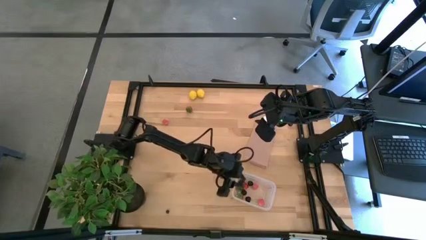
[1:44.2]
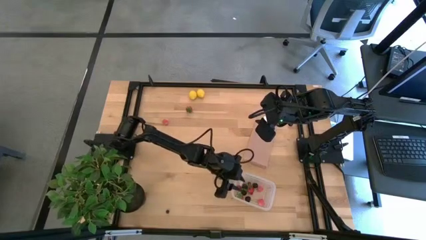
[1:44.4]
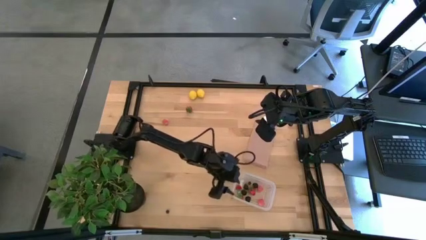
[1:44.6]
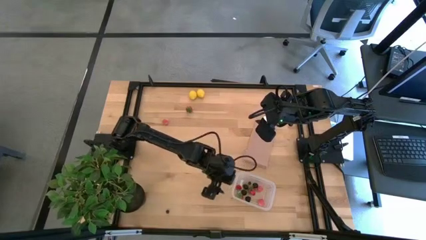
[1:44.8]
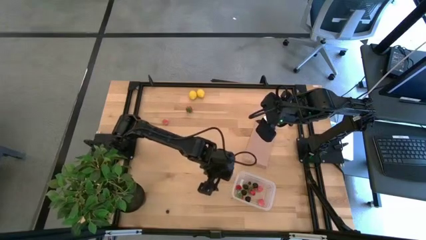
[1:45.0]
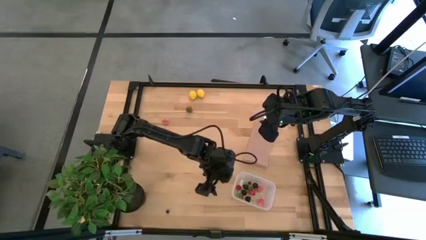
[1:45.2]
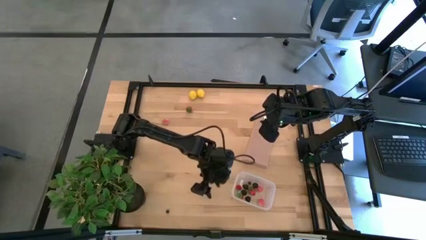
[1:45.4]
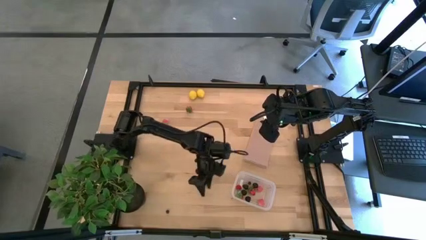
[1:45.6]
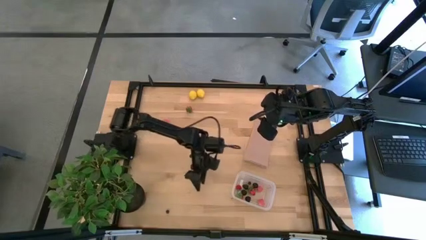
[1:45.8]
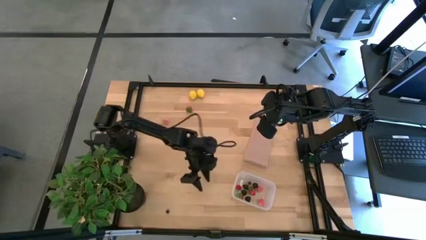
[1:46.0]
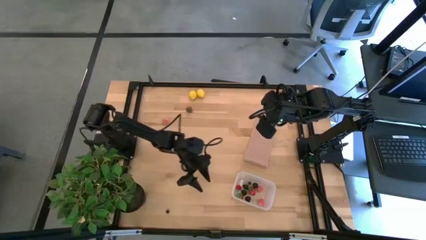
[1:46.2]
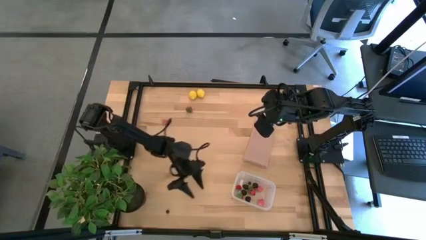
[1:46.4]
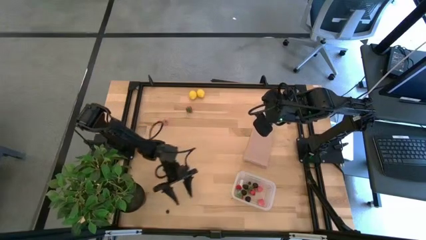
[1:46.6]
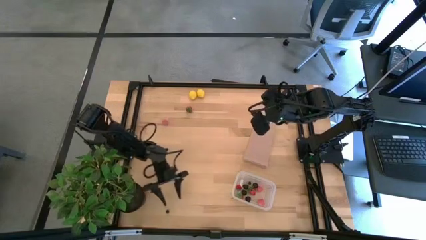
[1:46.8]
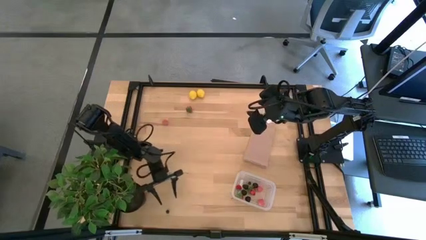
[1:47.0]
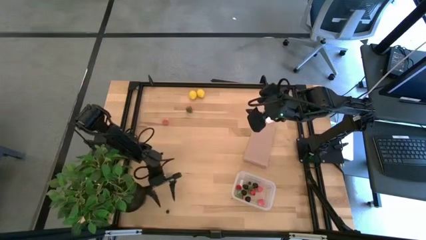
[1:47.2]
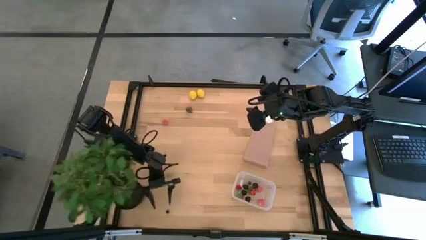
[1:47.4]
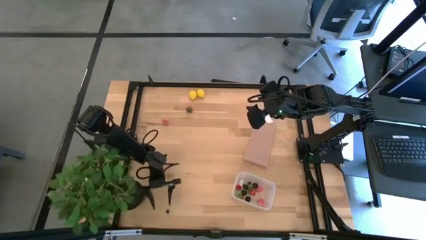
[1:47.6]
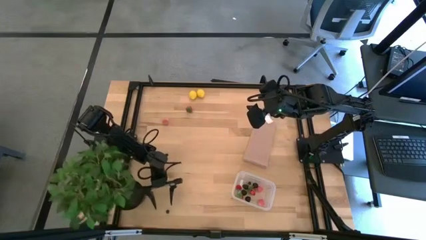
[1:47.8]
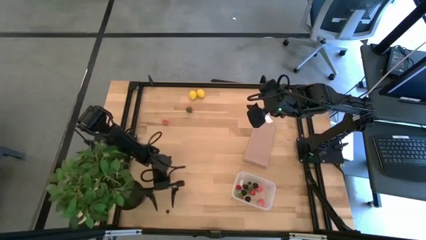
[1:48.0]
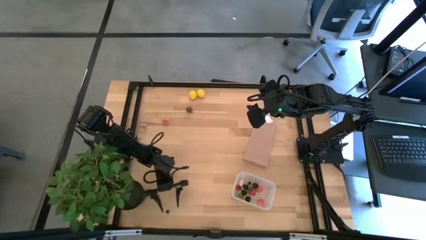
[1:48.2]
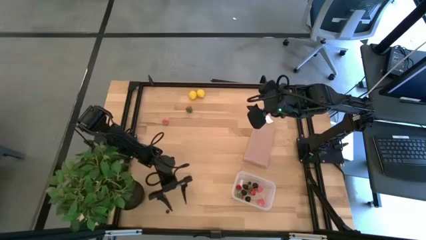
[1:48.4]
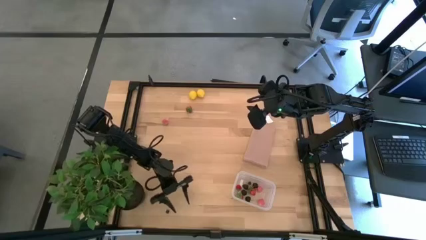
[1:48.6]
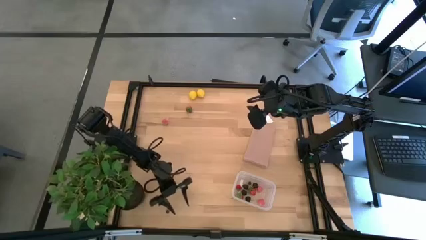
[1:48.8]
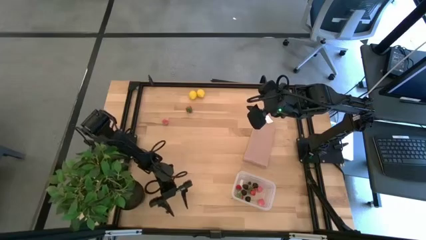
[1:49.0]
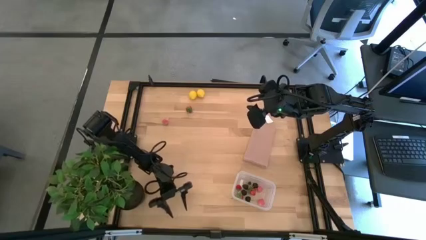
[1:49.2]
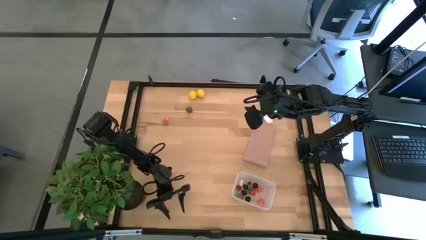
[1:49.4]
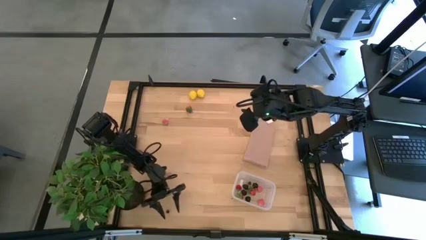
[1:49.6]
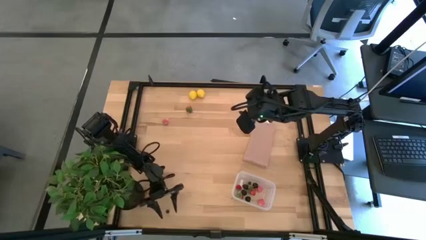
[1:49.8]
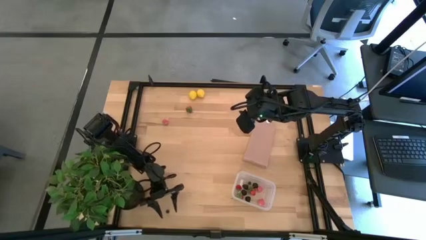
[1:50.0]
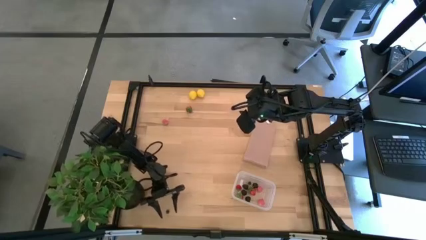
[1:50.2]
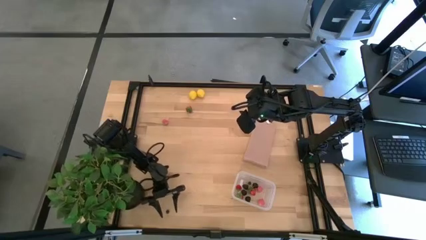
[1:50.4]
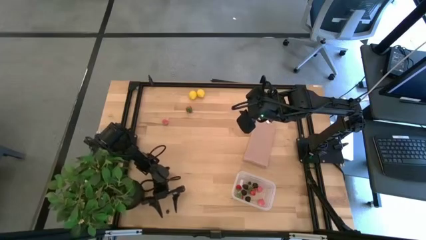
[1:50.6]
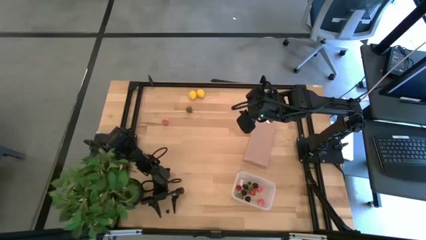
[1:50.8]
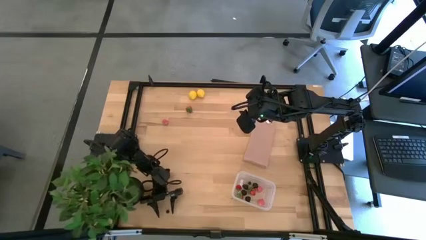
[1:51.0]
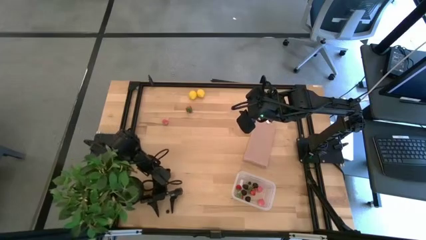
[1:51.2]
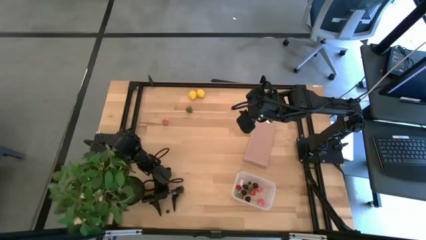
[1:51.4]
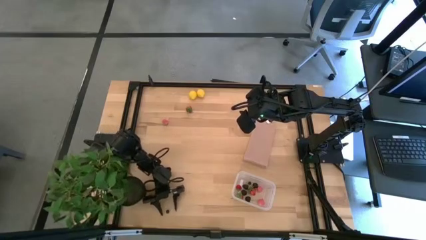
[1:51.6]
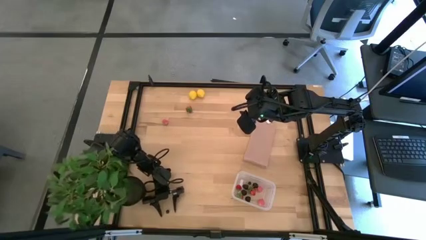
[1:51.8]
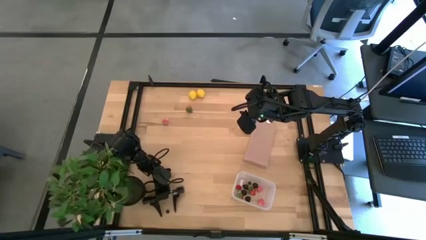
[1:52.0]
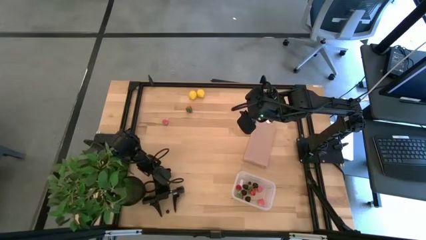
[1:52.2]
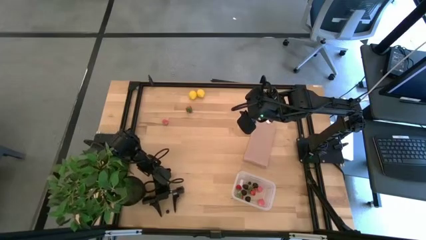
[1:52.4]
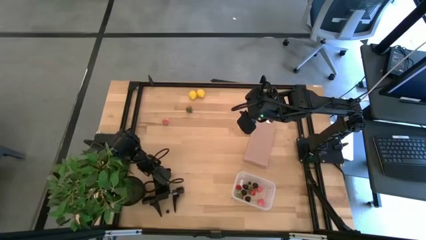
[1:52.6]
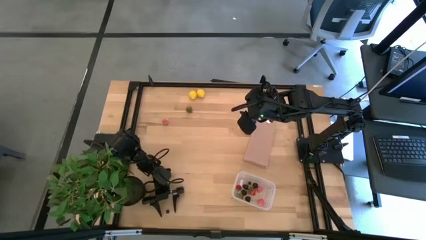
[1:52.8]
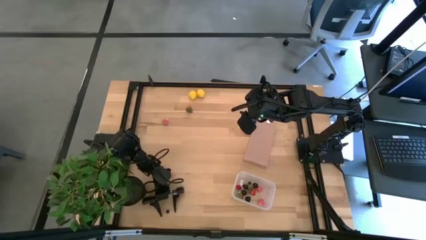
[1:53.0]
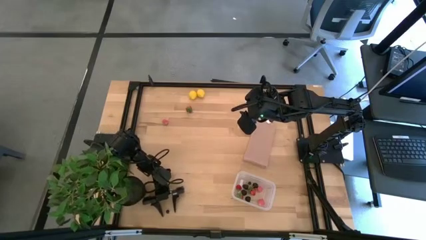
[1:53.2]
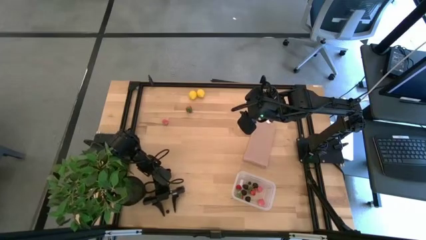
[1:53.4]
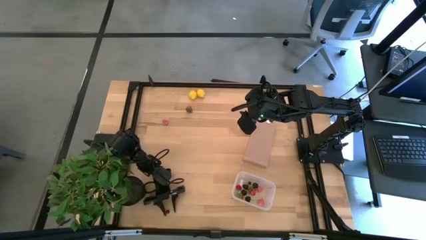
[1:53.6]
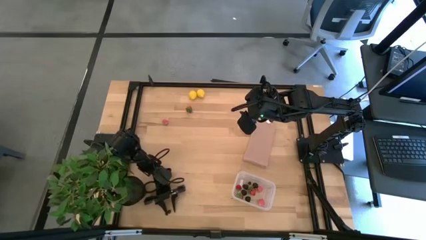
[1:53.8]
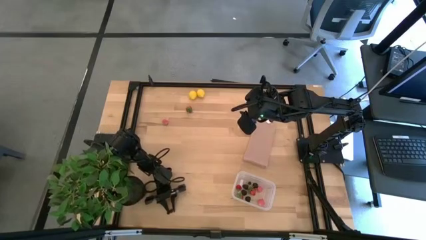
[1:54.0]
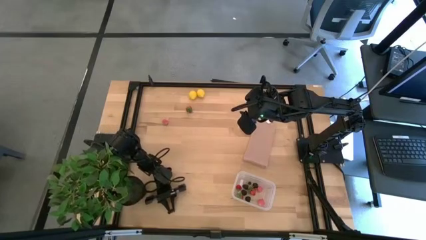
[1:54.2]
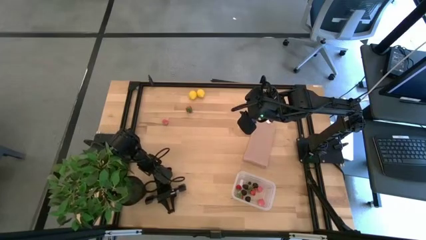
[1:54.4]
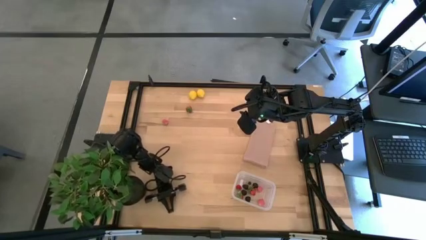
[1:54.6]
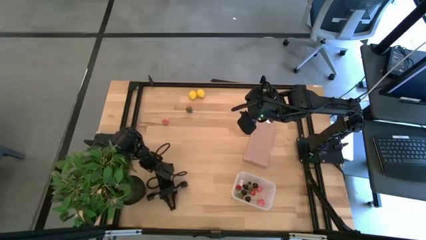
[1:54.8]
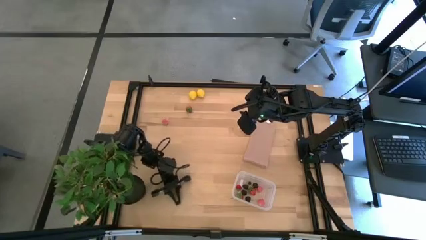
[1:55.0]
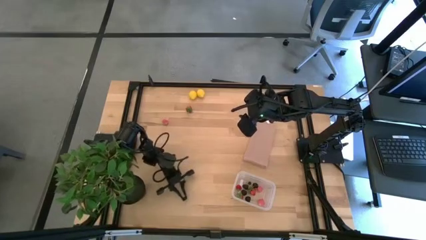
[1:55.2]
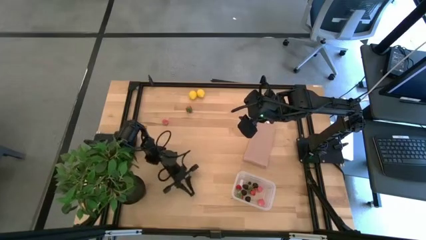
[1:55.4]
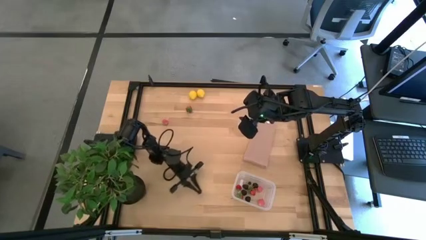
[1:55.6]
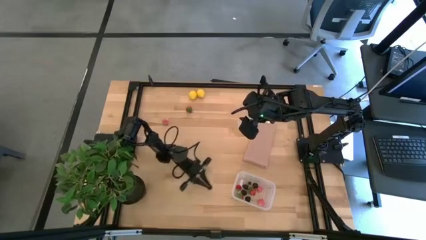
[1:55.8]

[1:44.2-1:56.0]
Task: Pick and placing Produce into tupperware
Put the blueberry into the transparent container

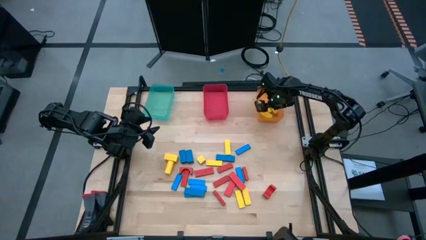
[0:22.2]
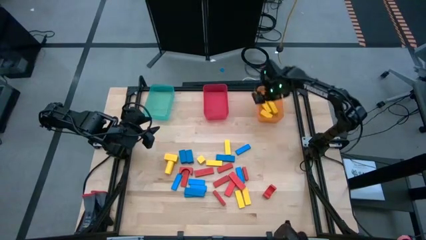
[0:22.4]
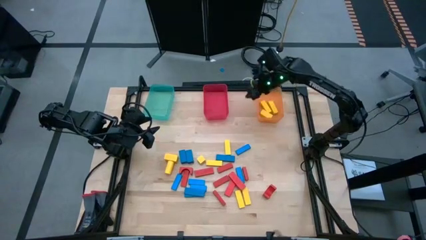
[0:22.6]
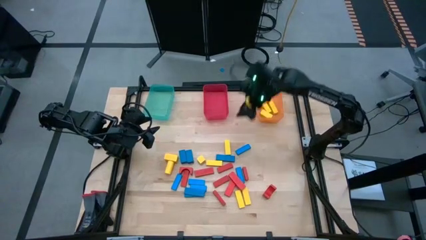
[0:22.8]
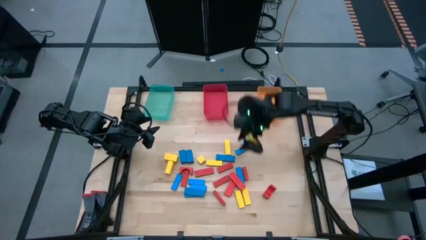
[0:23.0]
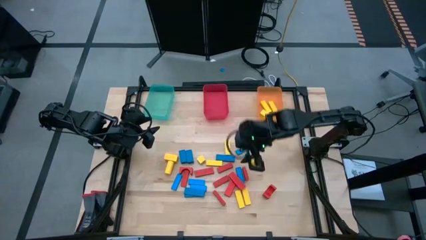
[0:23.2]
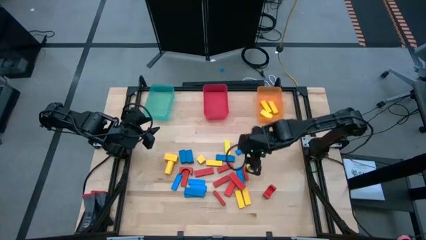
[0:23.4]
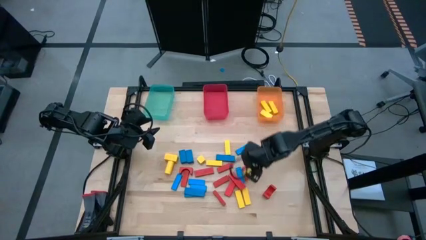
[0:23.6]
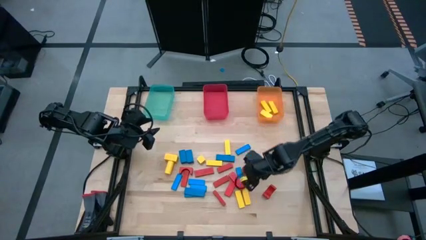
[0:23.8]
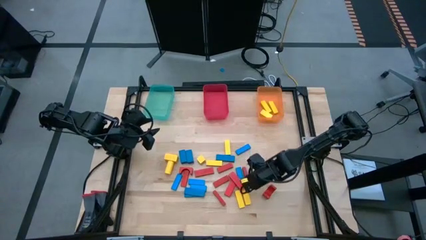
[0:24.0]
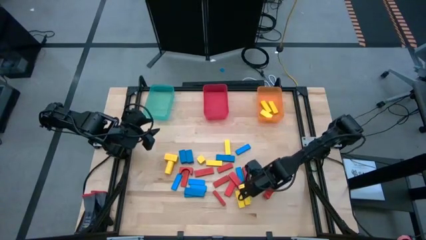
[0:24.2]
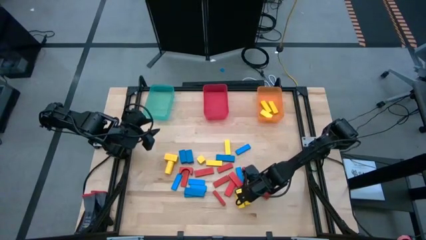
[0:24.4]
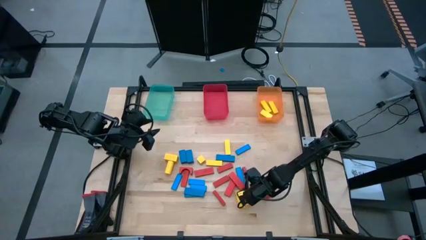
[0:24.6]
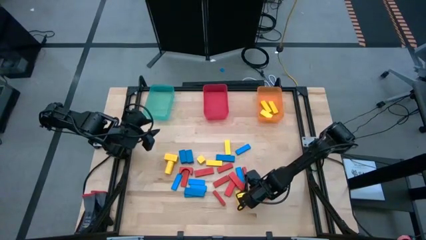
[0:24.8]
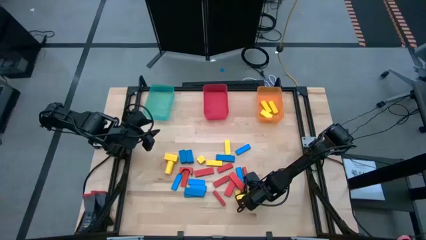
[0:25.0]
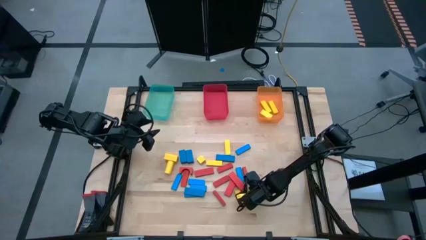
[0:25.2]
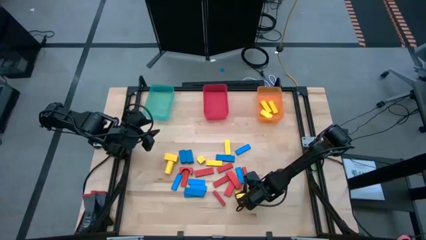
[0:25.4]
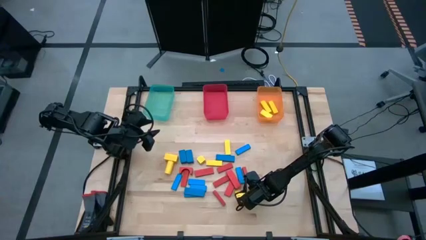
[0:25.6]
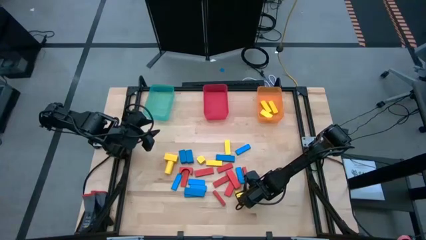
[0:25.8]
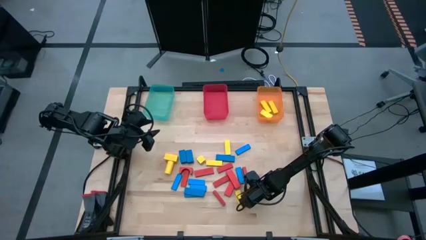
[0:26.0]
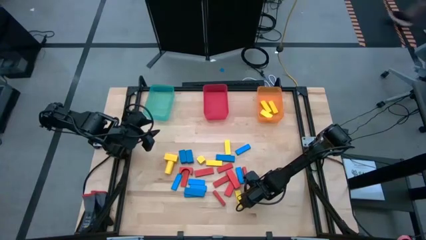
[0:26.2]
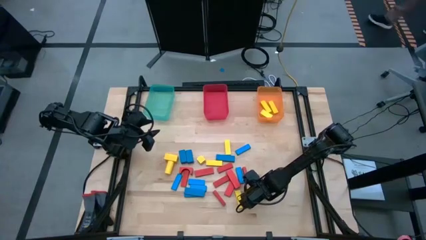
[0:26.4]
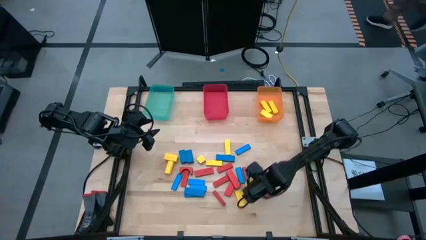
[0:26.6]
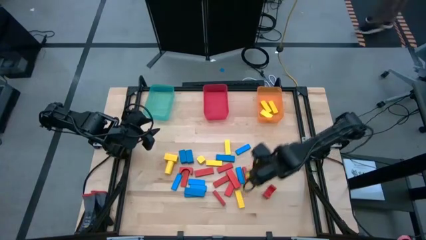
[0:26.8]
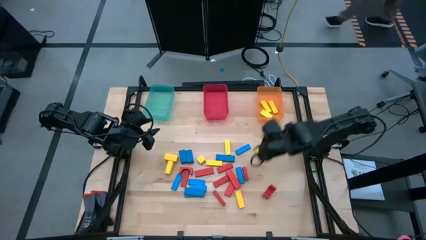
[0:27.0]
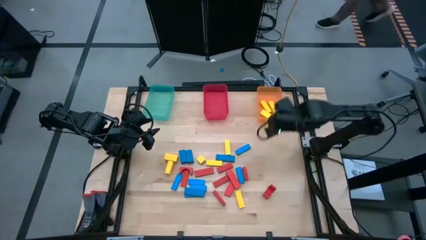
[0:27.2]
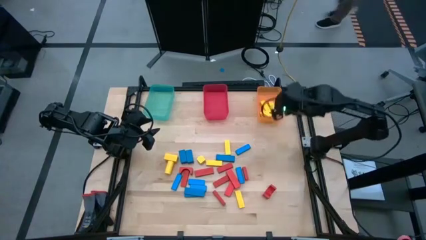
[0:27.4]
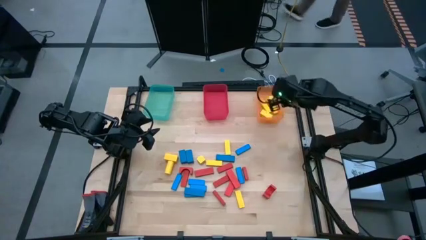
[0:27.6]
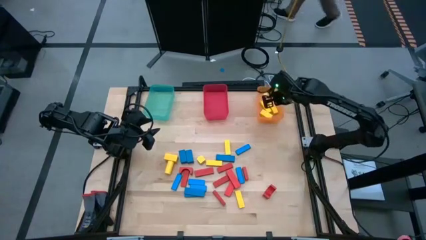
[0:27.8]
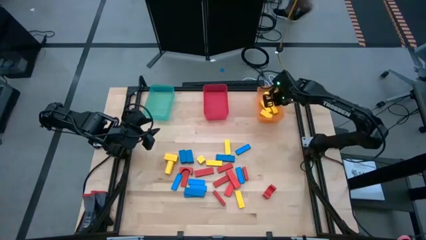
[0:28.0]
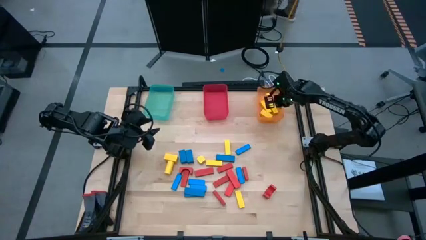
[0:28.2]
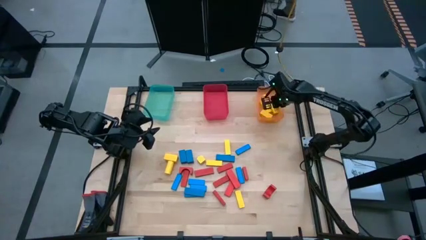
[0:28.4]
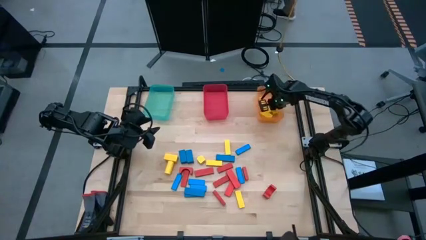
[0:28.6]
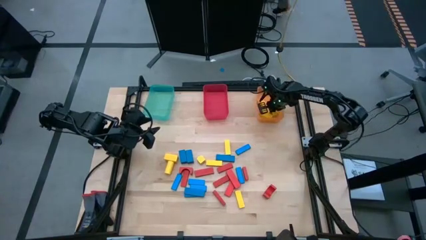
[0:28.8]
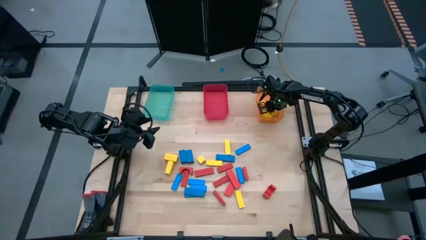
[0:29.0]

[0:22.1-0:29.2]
Task: Sort blocks
Put the yellow block into the orange bin
